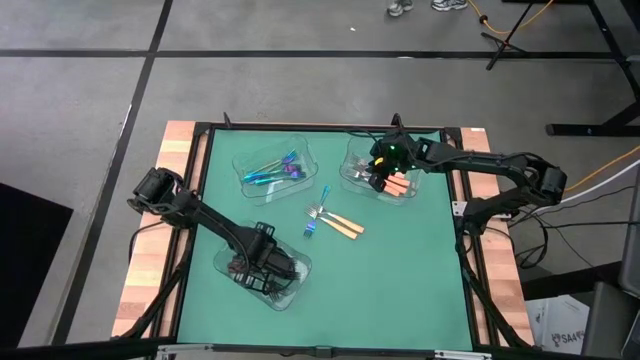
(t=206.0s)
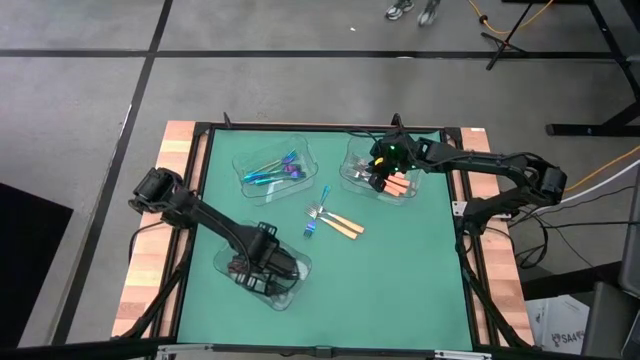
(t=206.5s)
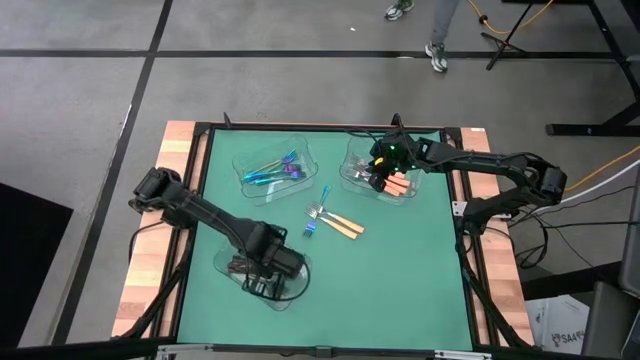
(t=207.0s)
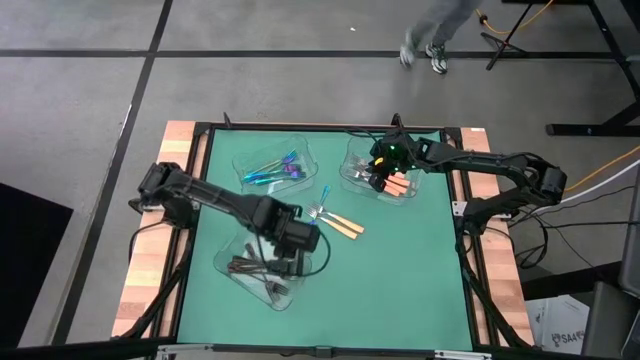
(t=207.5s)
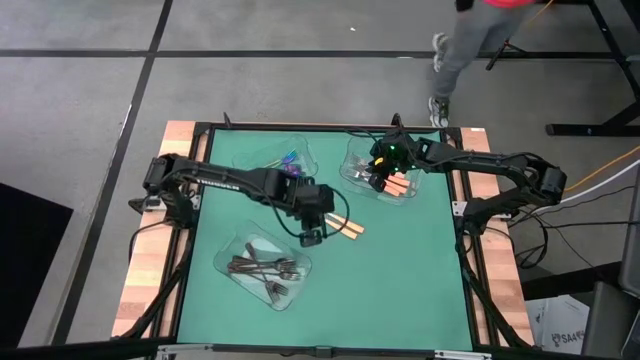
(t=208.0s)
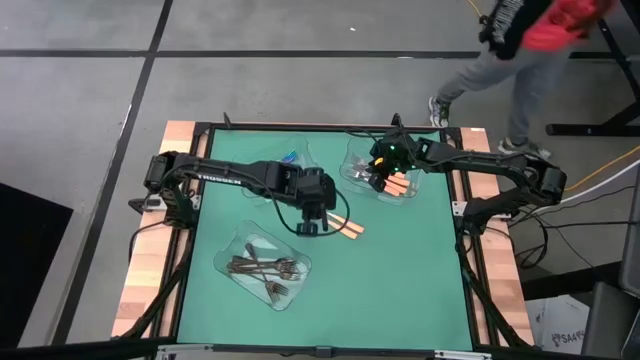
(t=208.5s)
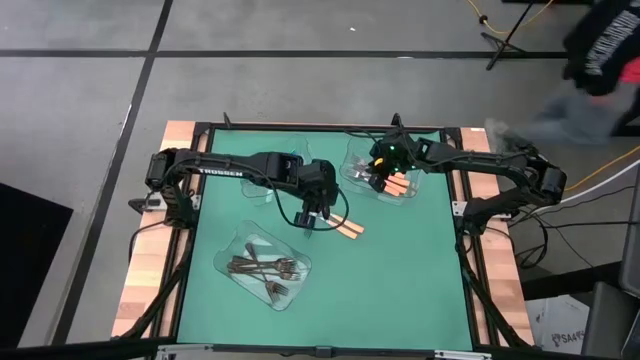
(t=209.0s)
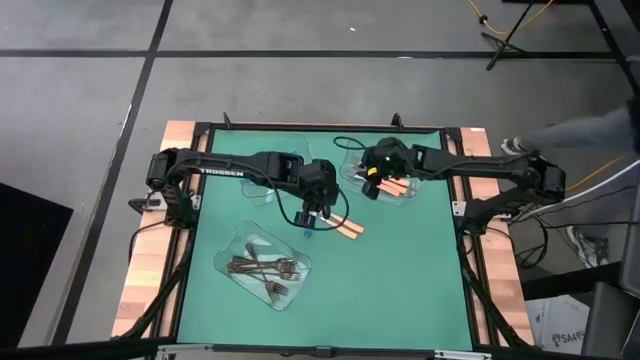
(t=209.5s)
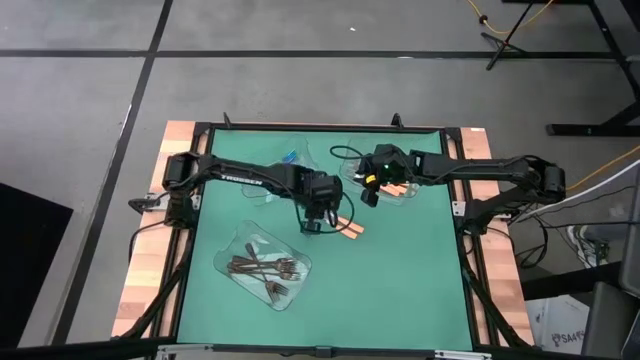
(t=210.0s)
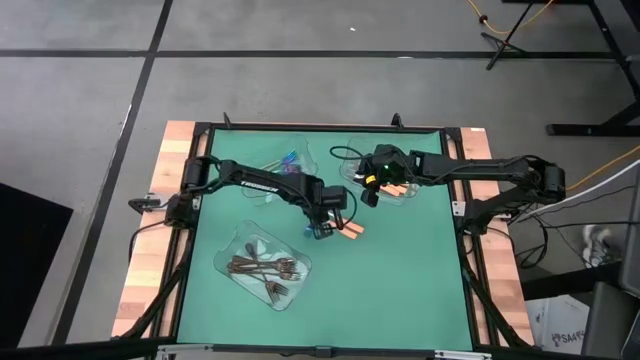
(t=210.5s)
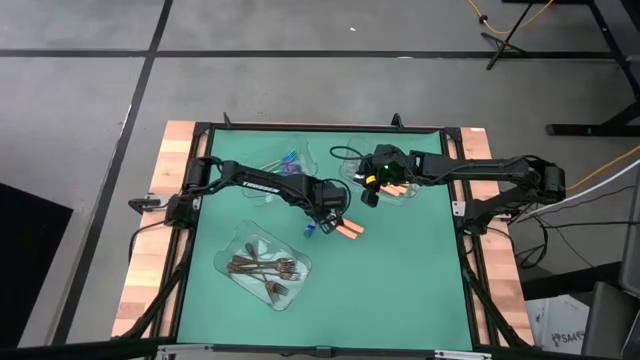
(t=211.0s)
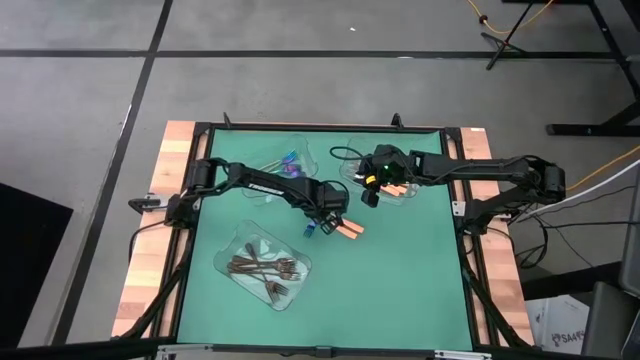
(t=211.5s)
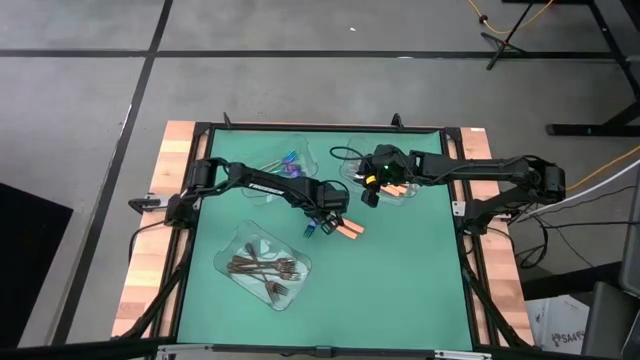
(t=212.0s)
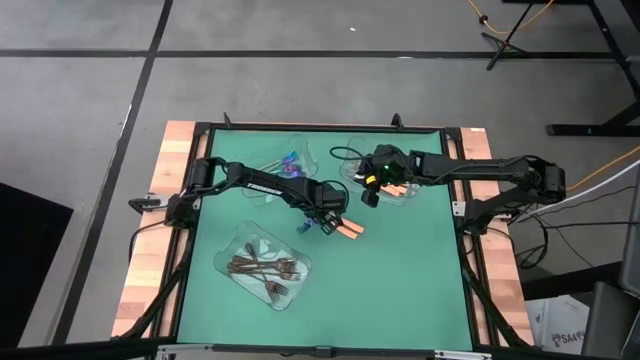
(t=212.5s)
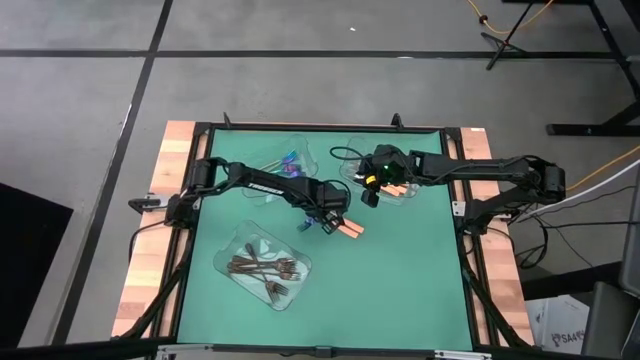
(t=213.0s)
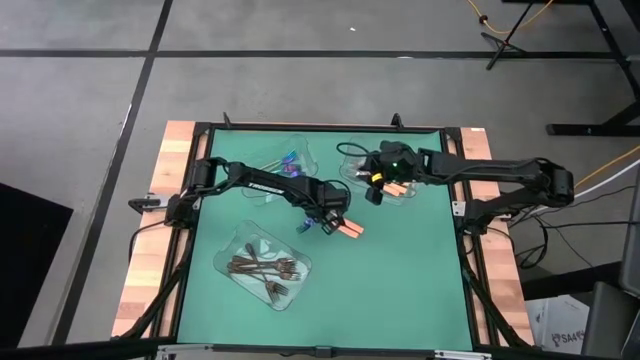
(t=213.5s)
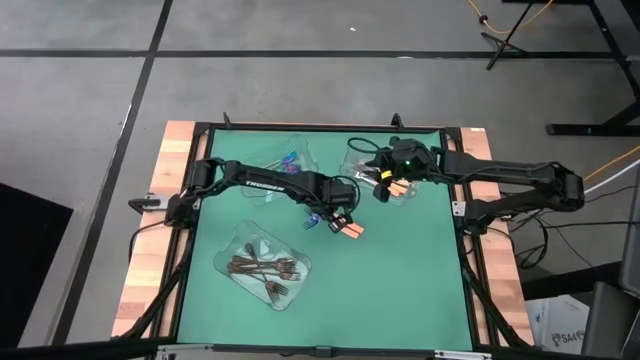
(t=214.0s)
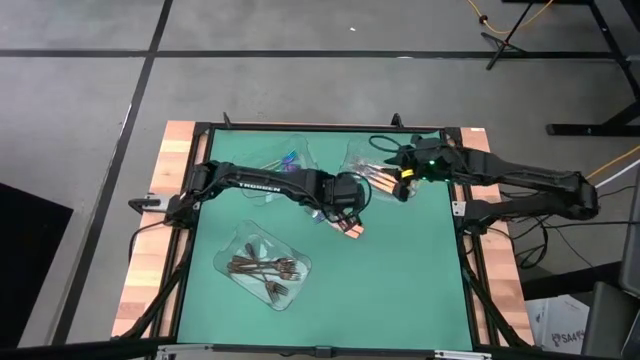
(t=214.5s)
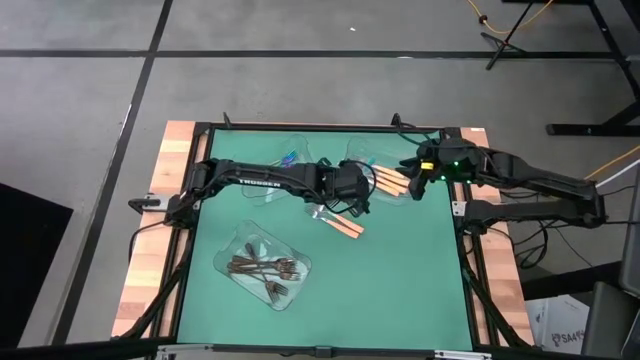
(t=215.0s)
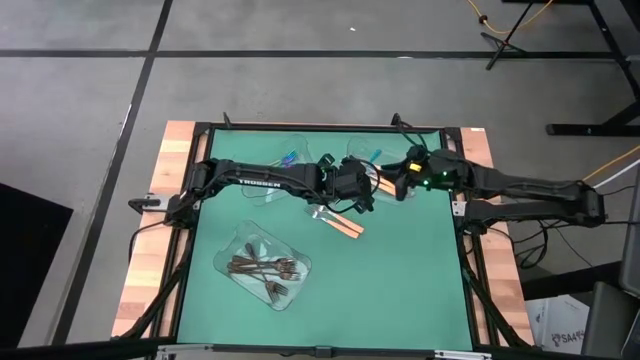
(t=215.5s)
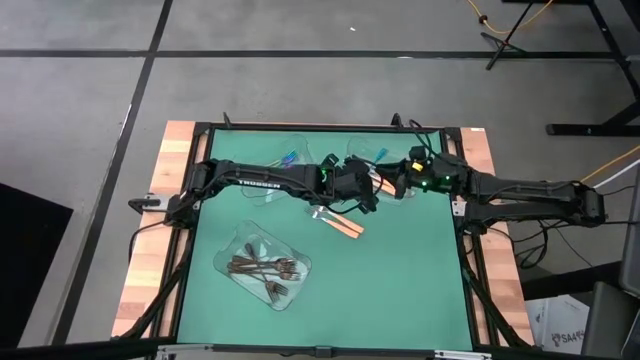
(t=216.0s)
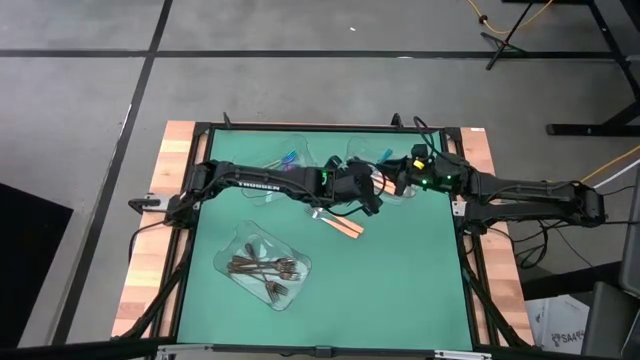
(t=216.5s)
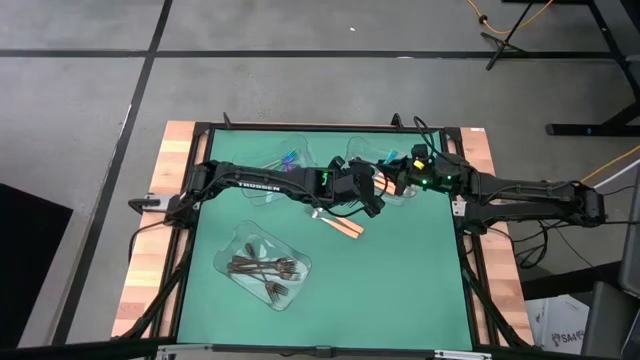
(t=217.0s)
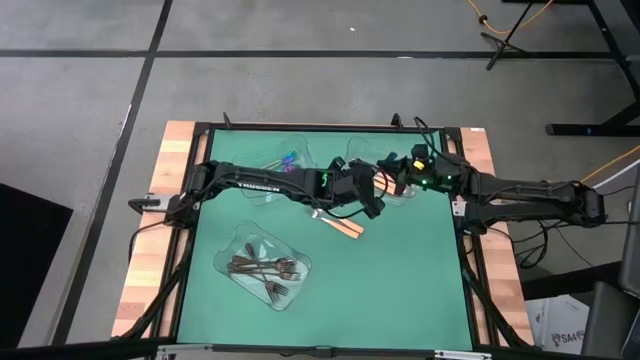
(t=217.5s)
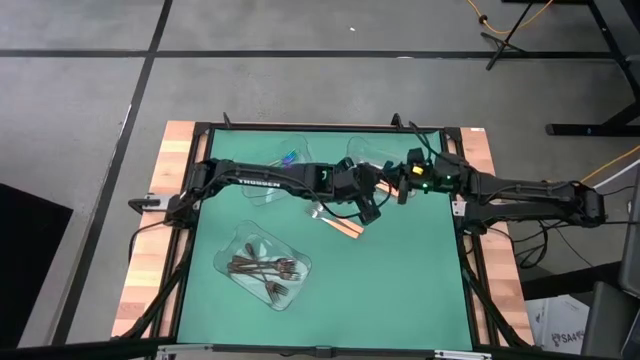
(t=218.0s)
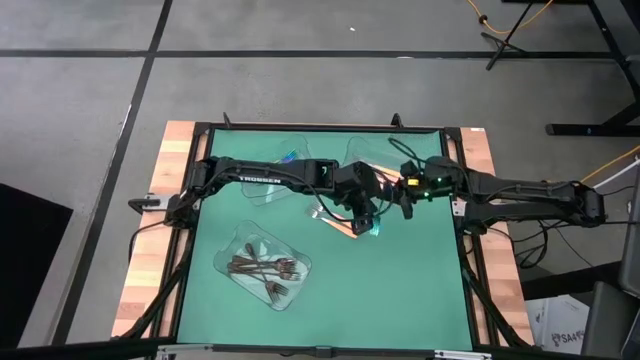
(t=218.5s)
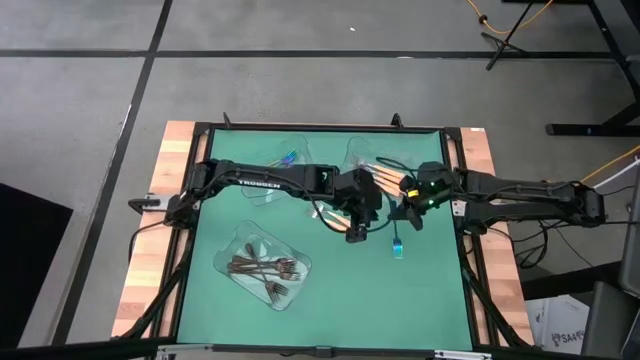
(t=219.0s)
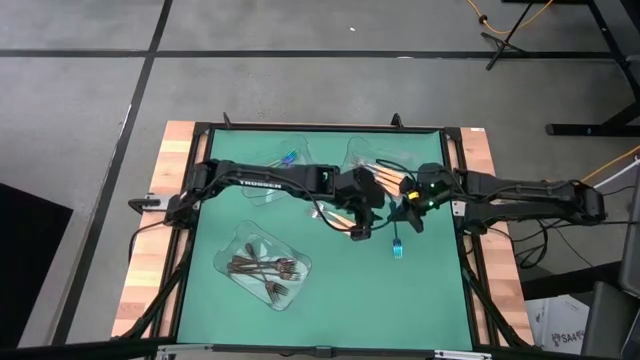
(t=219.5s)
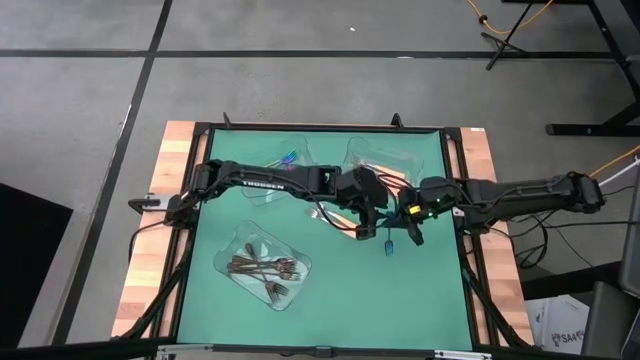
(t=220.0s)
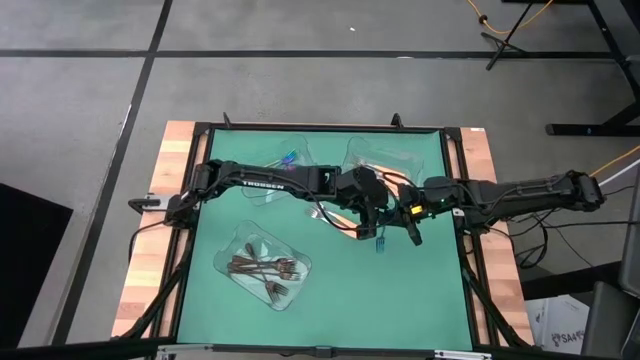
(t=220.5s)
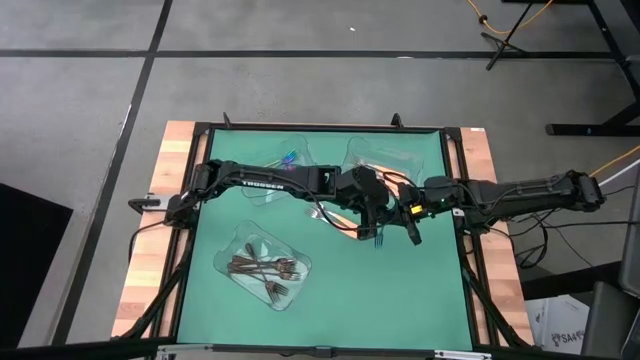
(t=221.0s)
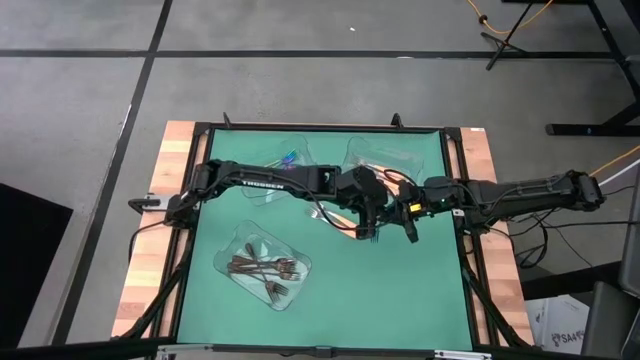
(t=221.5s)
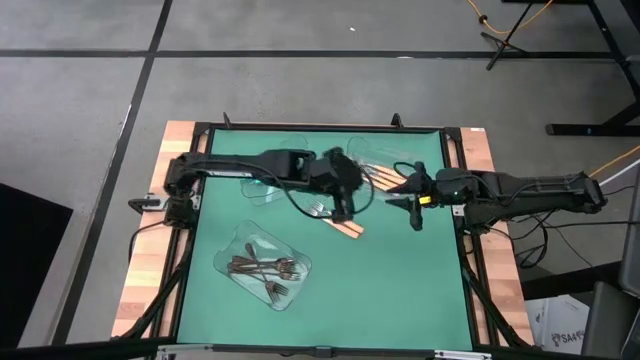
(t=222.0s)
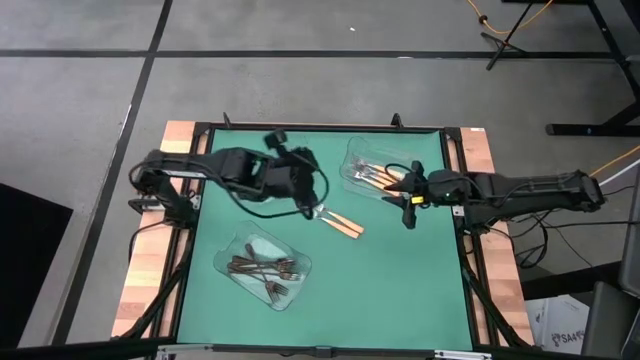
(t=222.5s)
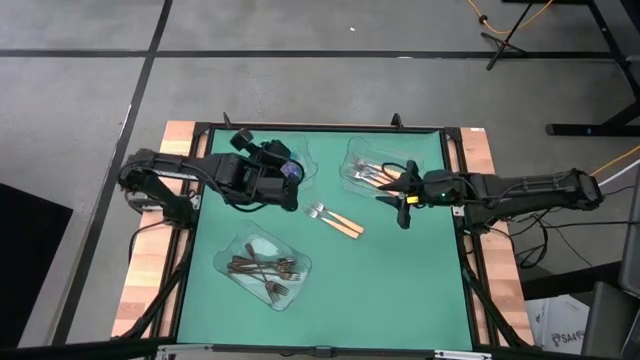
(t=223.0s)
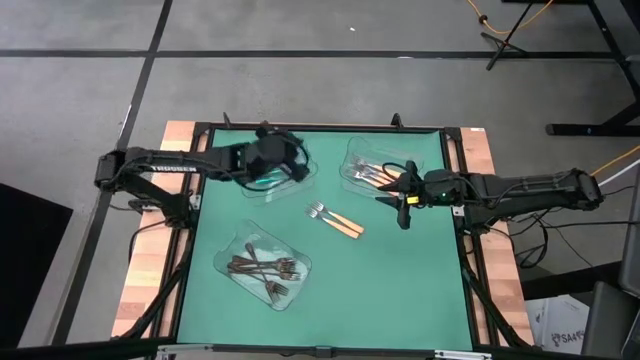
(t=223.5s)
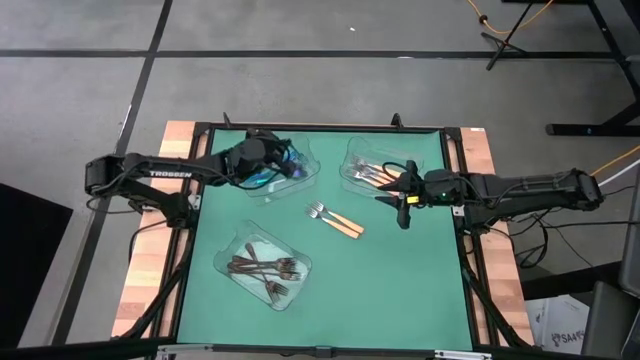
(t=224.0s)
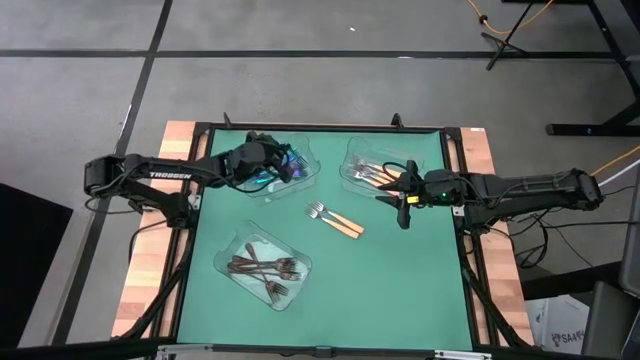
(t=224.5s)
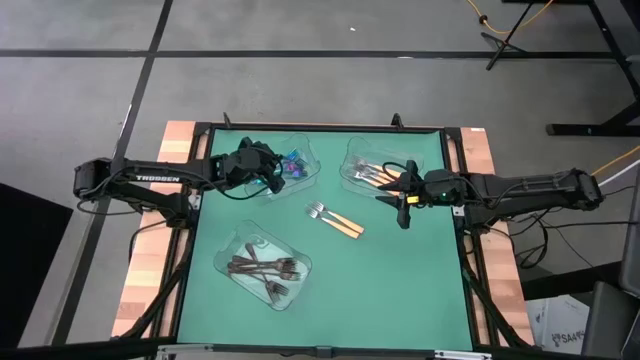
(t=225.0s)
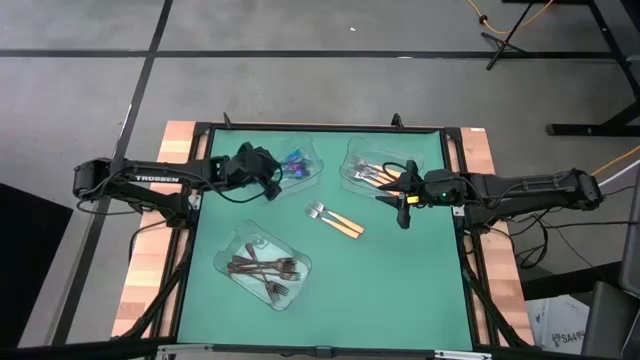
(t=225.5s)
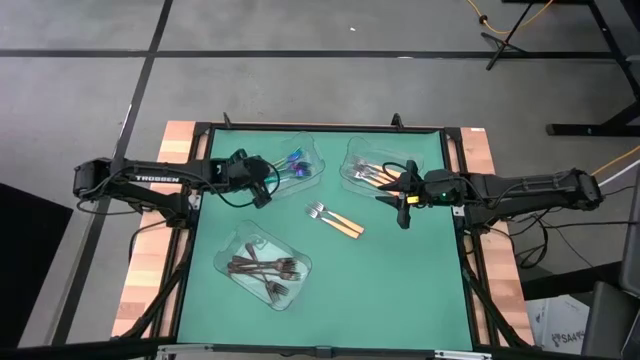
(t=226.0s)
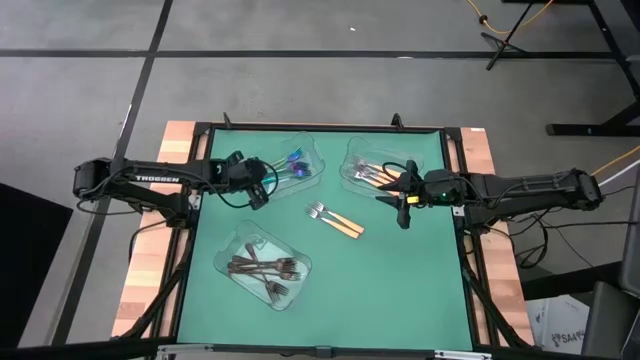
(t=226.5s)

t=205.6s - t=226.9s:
Task: Sort silverware by color (type)
Put the blue fork into the top left transparent bin
